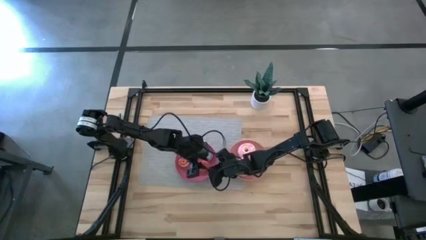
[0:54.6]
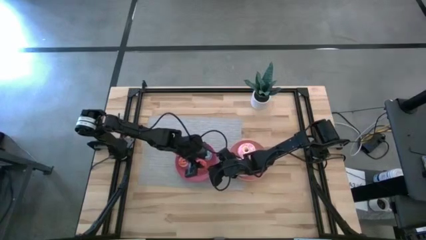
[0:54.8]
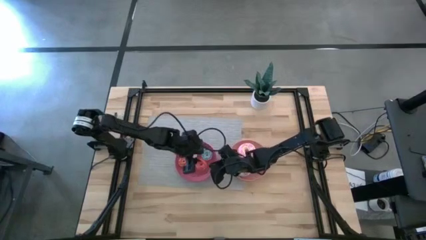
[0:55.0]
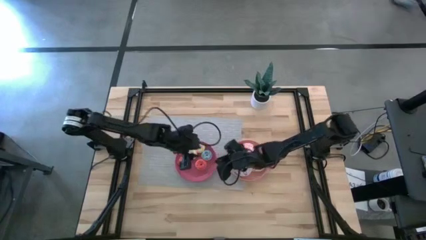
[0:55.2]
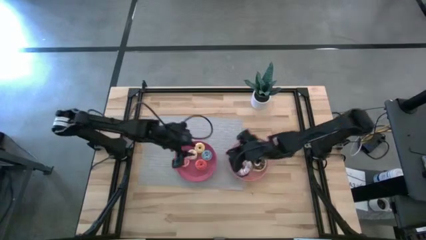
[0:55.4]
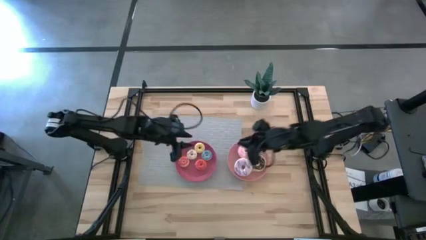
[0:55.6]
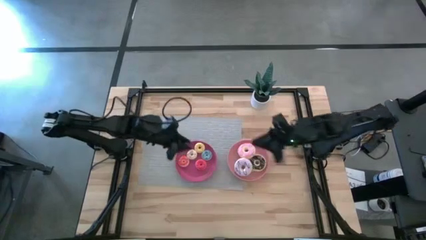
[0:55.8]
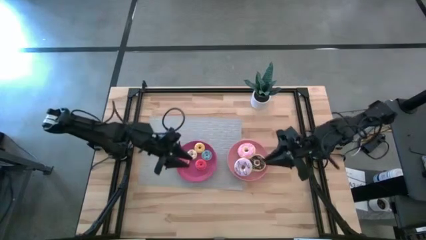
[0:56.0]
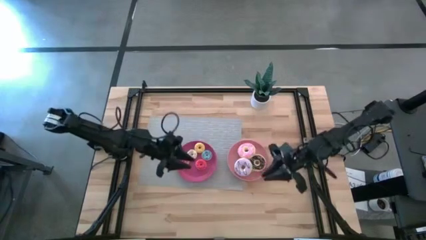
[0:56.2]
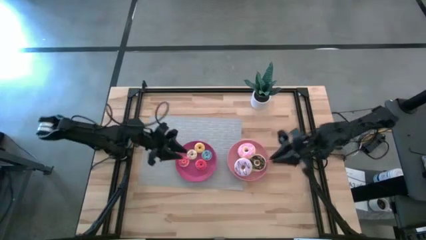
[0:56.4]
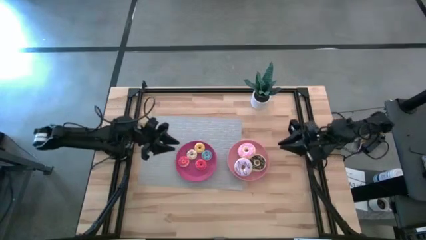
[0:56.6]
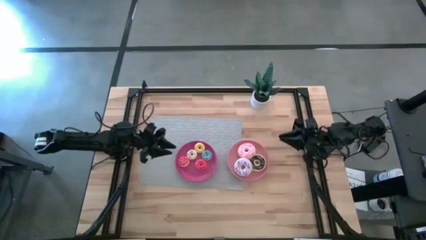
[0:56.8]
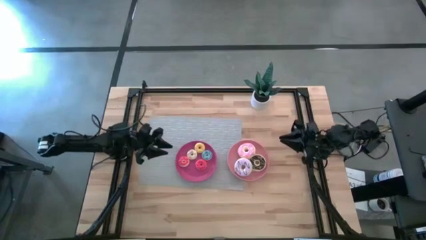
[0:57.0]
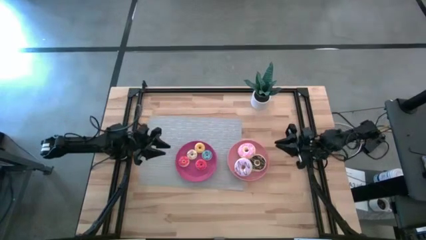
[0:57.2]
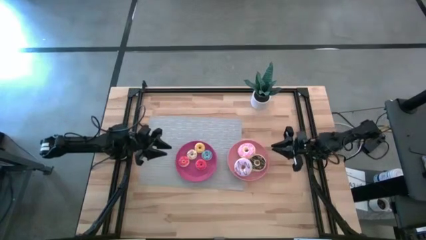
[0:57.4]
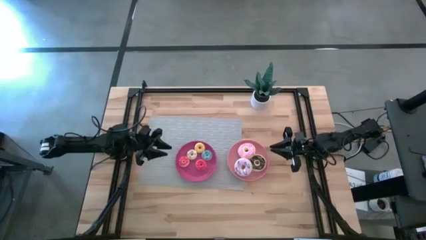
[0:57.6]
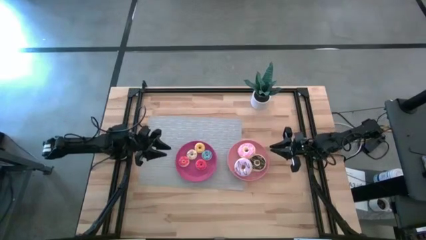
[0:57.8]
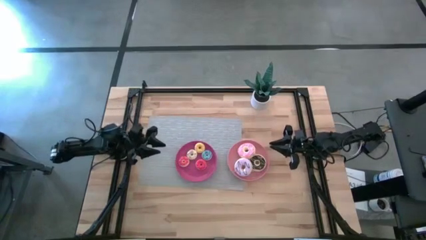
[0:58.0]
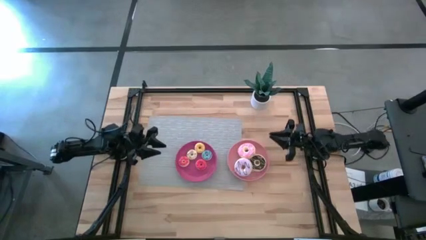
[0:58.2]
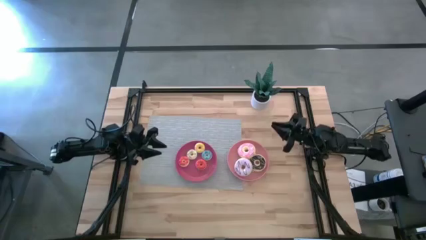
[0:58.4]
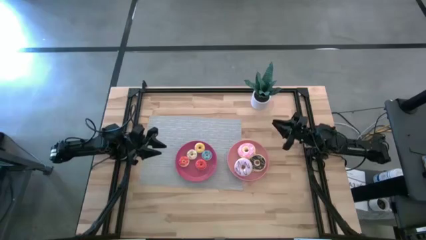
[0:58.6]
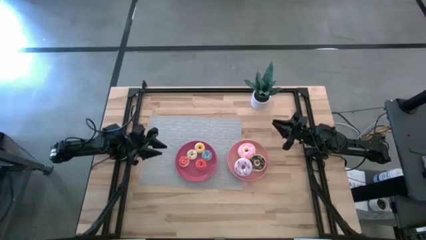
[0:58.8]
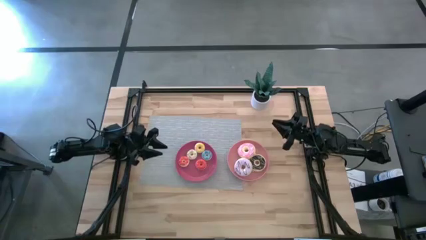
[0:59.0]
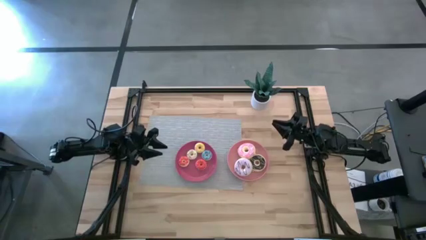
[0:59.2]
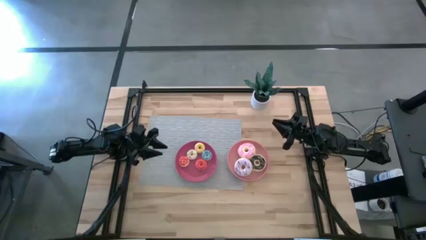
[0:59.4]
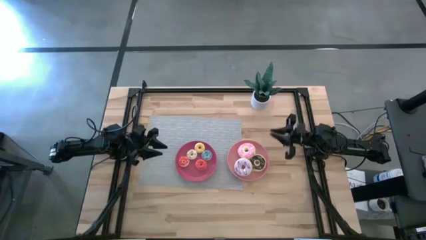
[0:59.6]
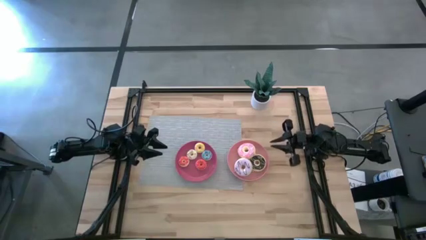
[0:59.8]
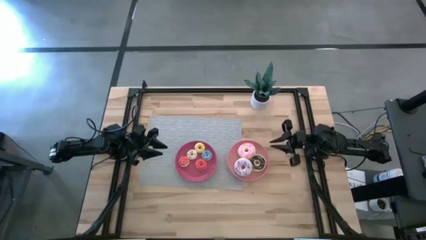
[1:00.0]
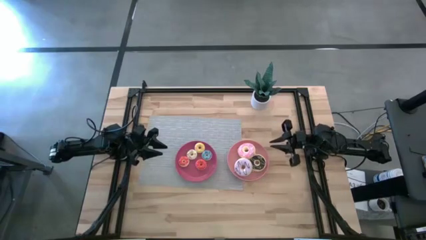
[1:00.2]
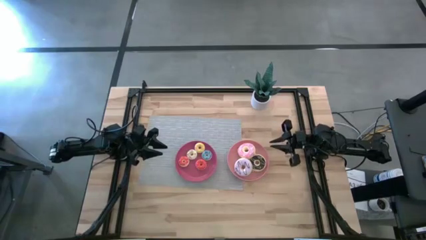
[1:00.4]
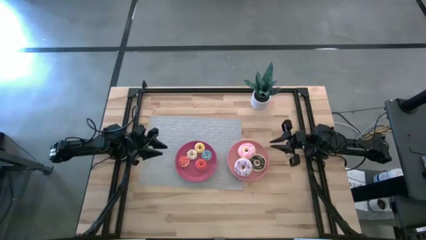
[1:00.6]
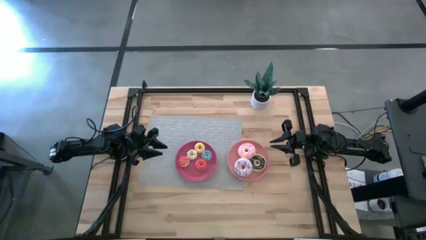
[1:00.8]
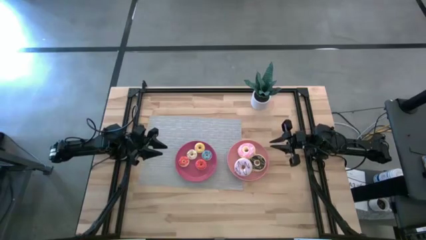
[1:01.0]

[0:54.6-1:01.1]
Task: Pick & Place donuts
Return to Home Position

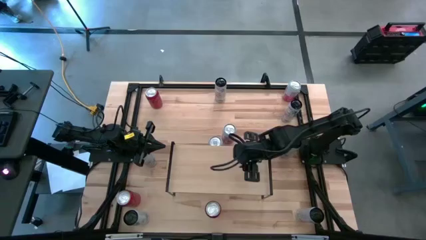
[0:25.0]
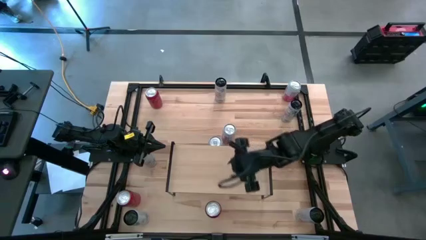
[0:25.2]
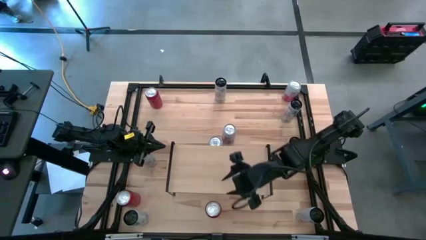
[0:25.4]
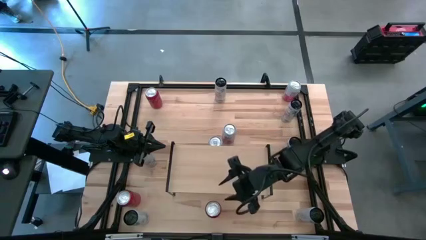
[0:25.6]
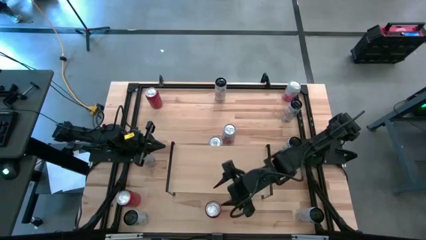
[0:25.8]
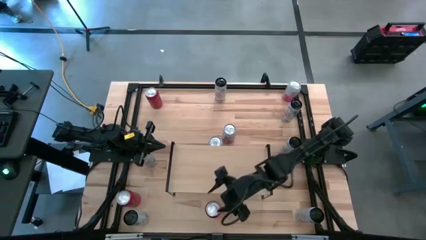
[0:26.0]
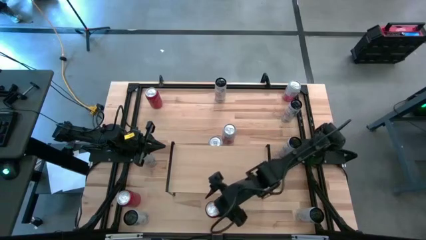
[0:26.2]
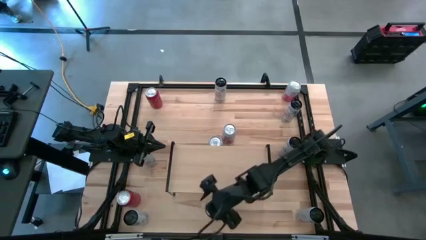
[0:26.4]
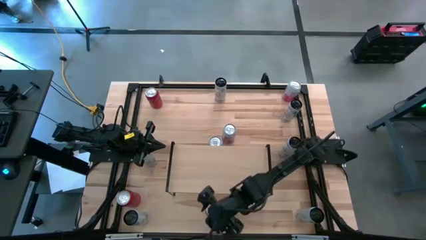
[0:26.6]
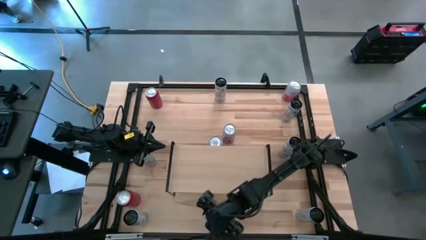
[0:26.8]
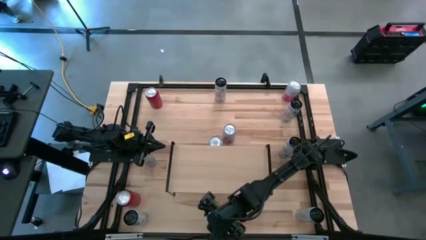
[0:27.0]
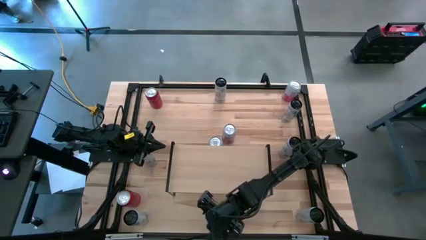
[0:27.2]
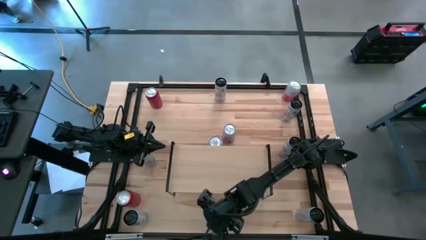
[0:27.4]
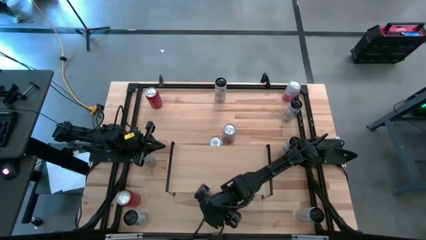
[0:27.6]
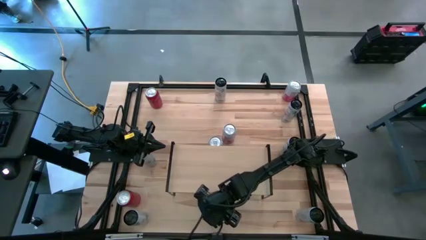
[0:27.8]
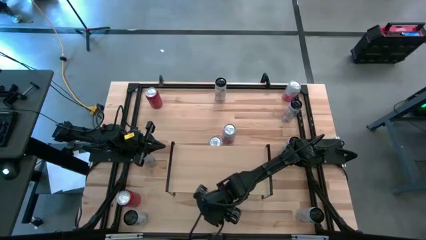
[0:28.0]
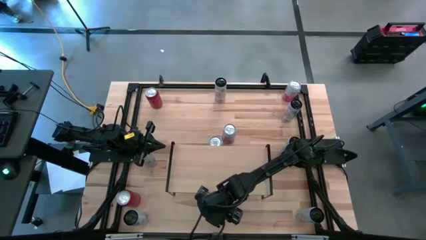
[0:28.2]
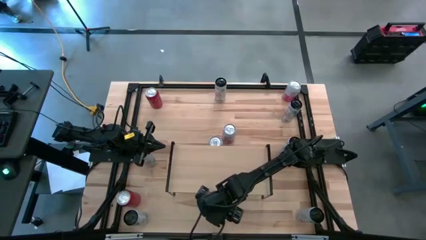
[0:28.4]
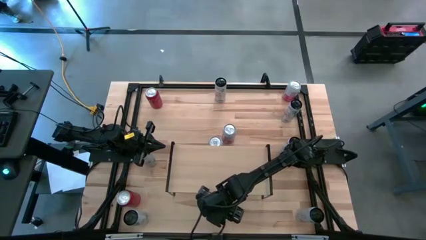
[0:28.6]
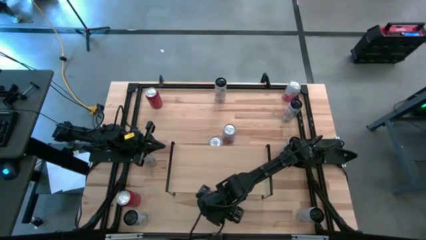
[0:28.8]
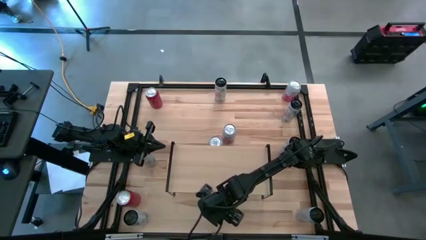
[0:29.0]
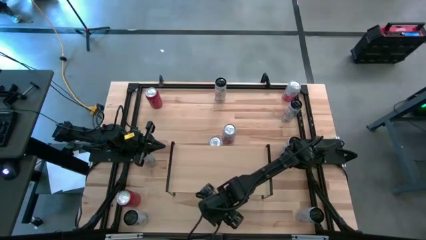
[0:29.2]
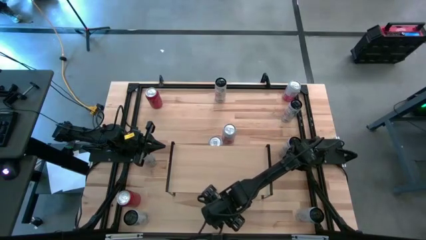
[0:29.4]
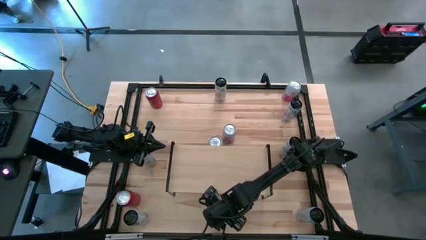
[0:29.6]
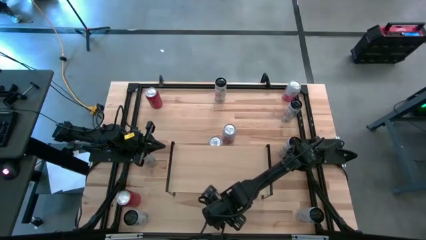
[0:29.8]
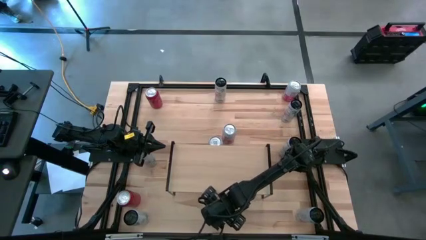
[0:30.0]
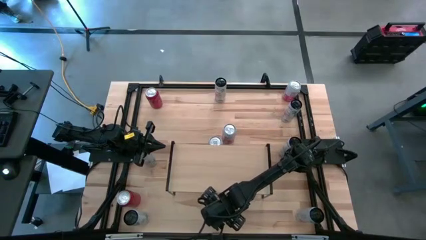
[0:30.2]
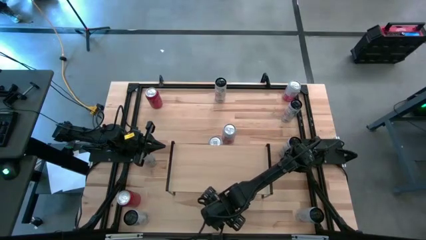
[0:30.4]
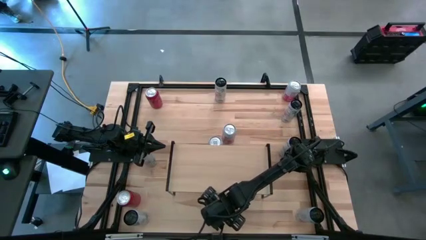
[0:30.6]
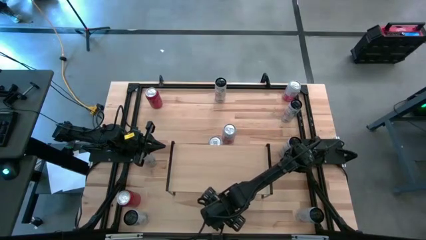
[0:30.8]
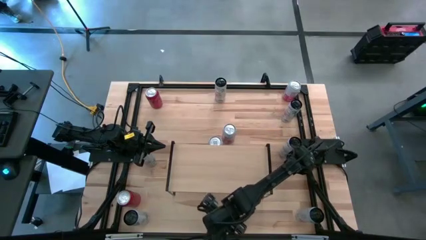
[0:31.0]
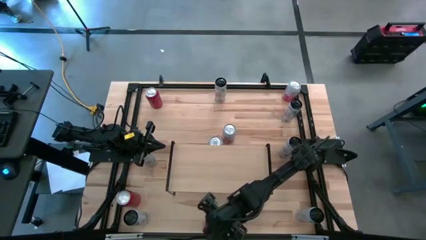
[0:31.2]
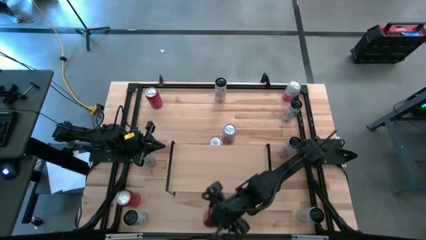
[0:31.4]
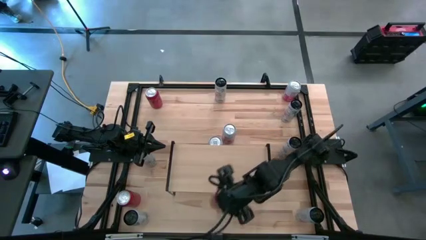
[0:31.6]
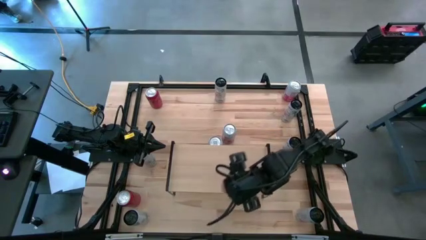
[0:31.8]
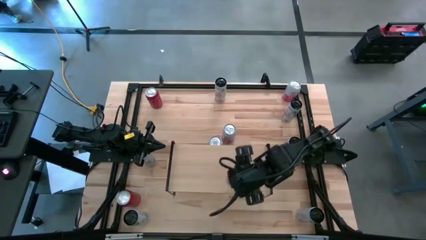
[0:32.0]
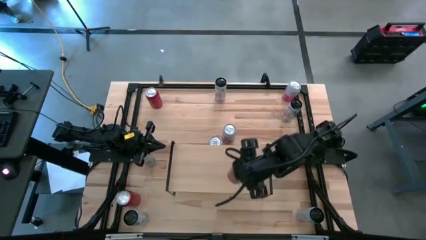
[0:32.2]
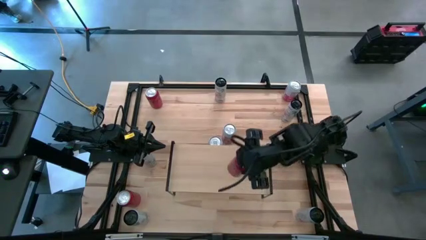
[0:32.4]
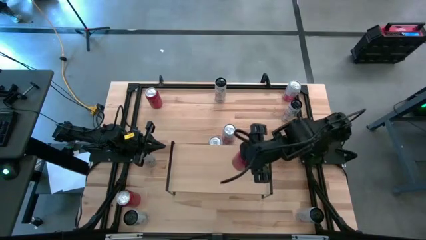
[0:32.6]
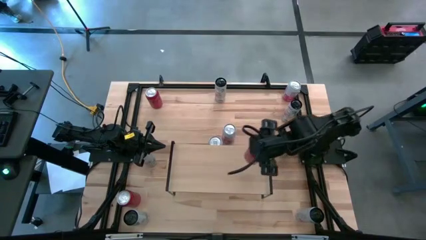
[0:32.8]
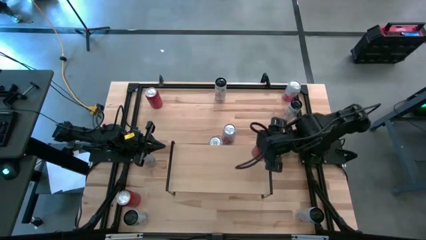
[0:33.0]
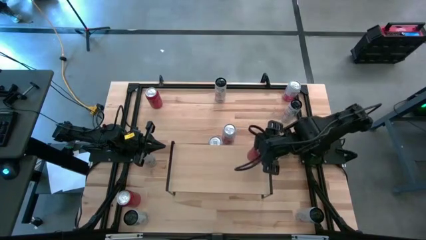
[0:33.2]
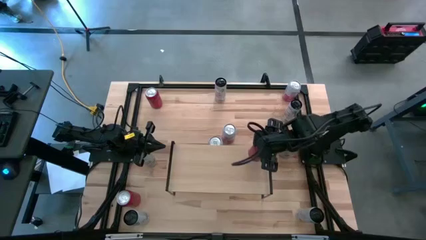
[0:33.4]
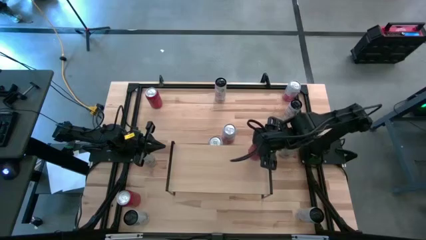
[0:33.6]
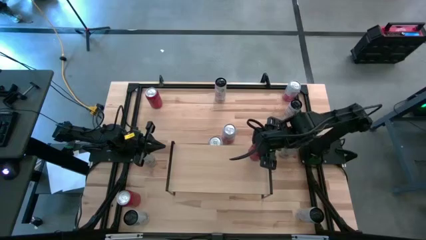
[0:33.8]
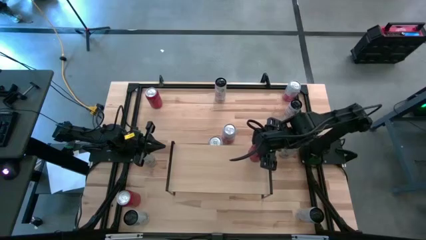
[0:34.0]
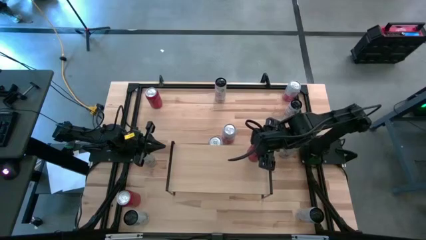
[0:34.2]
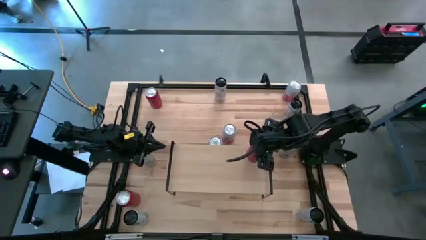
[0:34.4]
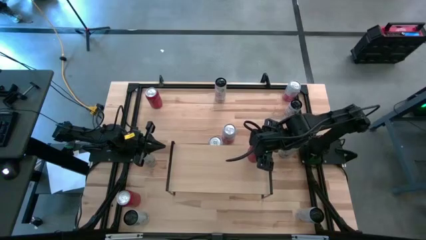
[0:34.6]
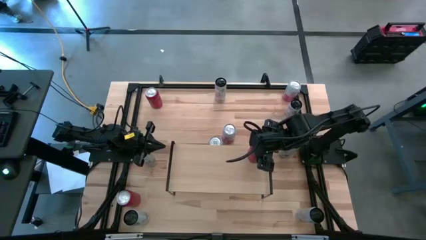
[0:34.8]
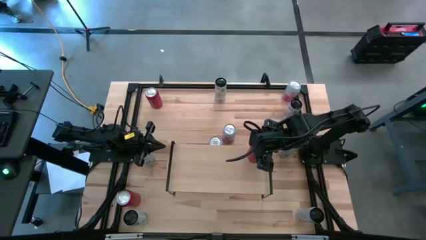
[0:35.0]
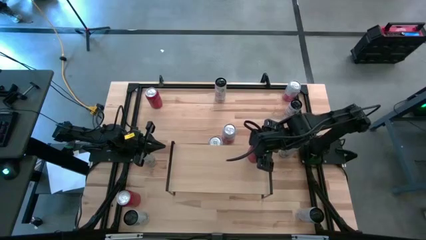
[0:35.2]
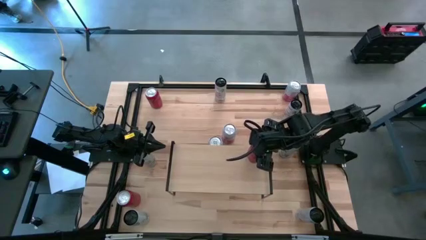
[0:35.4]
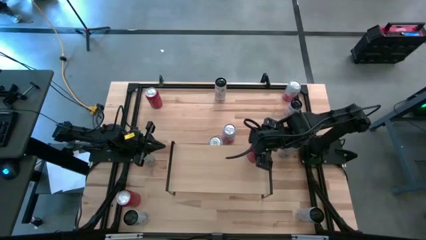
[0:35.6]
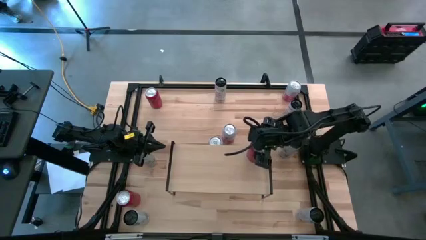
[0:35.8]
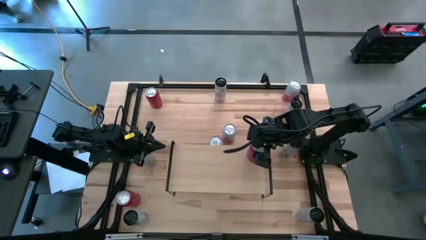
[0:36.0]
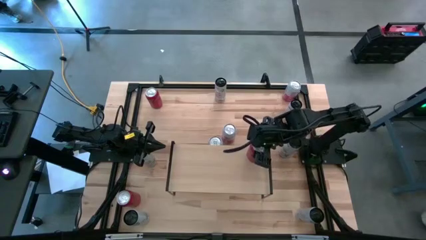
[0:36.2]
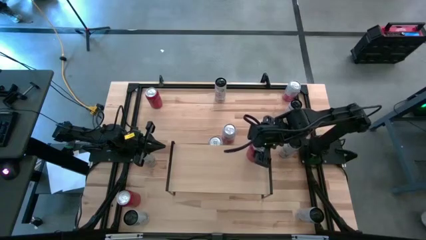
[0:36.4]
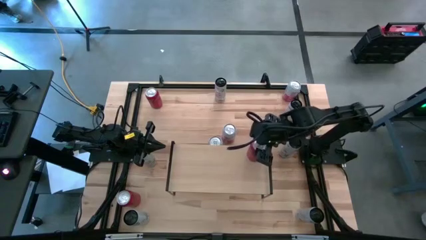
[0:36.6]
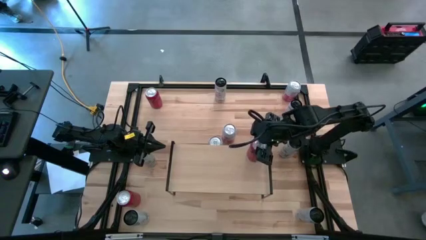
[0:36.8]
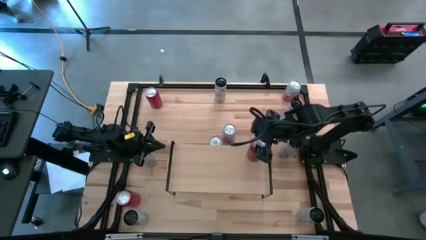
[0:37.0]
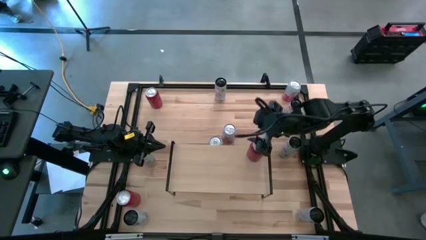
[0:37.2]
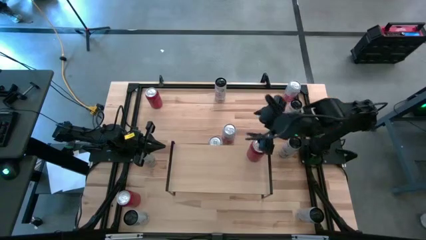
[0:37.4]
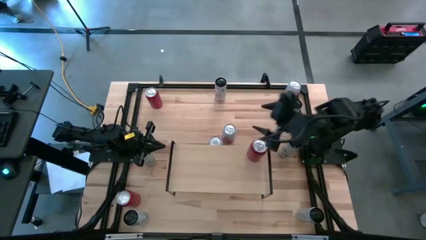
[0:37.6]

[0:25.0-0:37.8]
Task: Place canned beverage on shelf
Put the bottom right red-black soda can on the shelf
